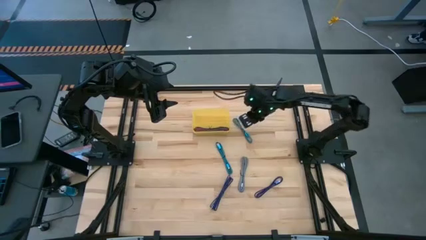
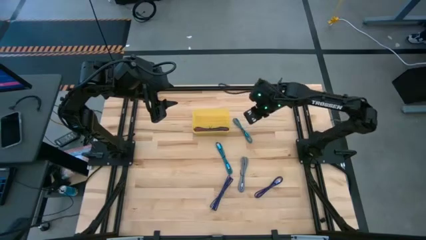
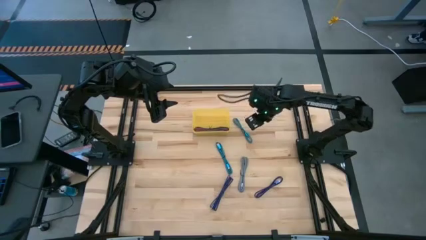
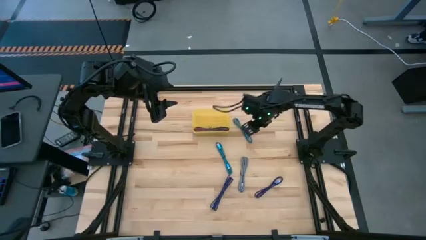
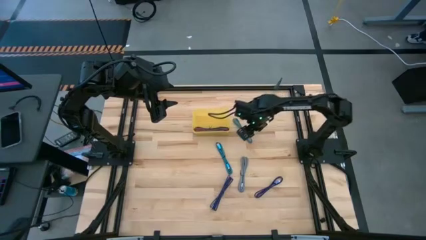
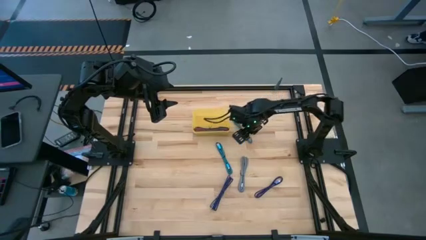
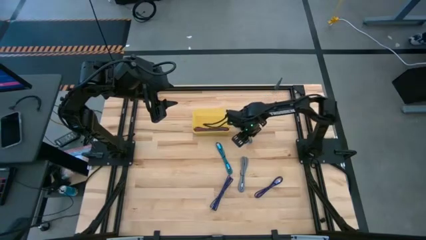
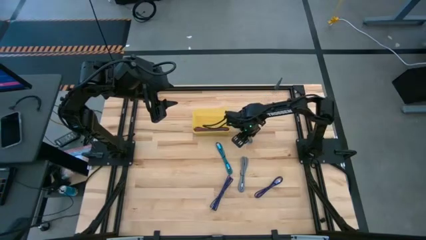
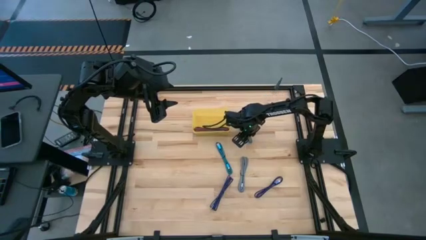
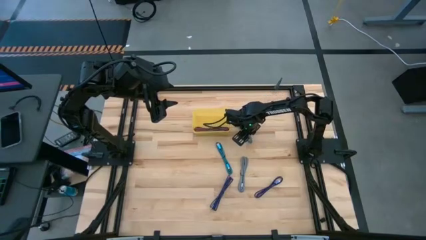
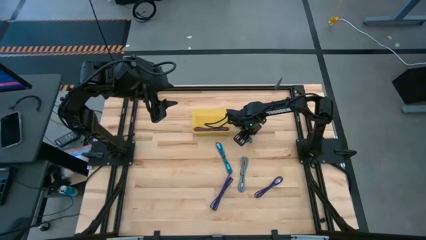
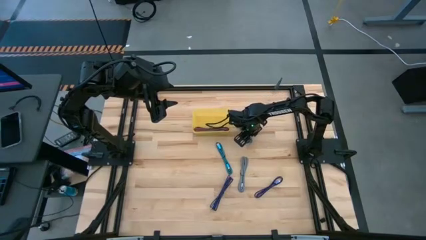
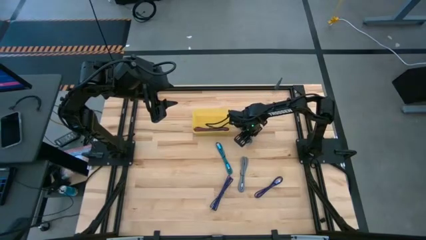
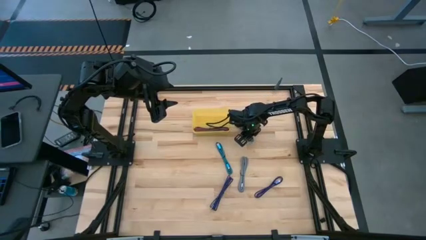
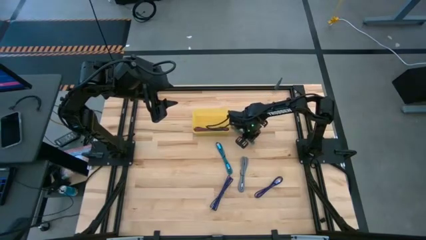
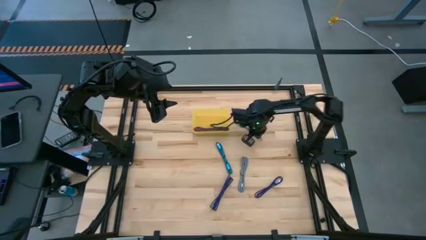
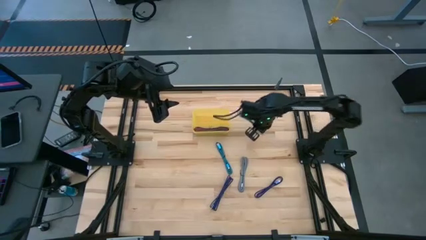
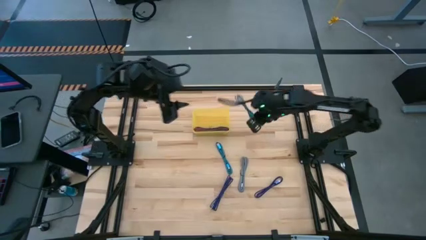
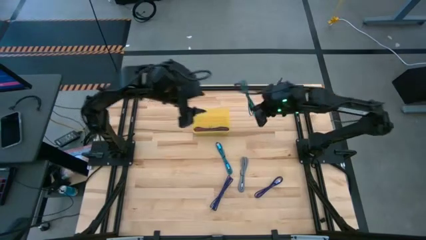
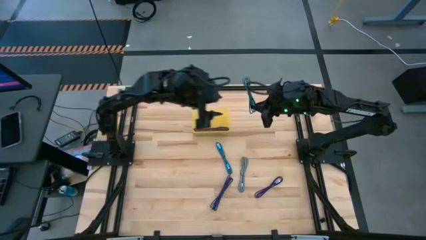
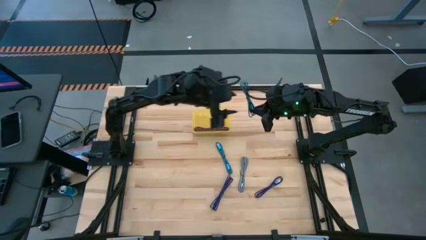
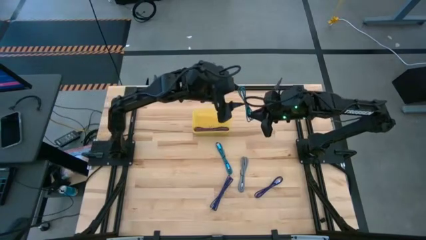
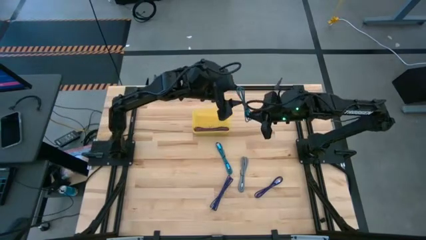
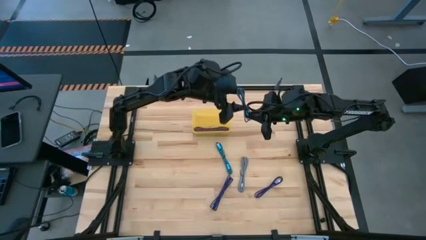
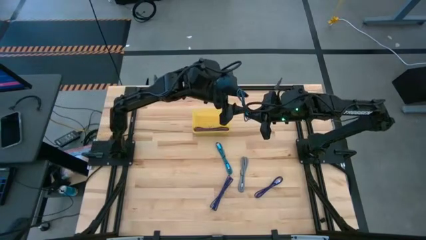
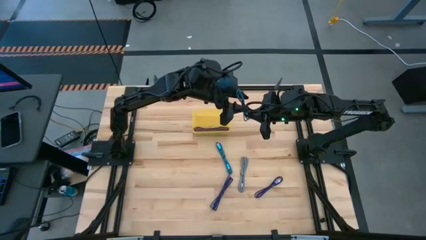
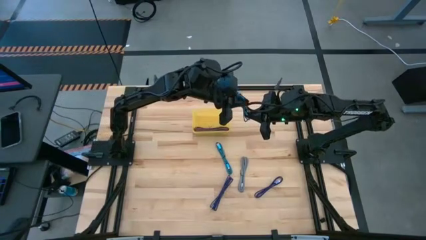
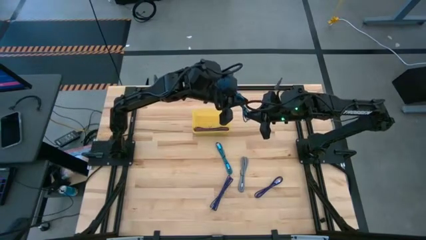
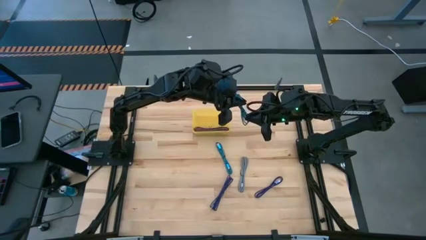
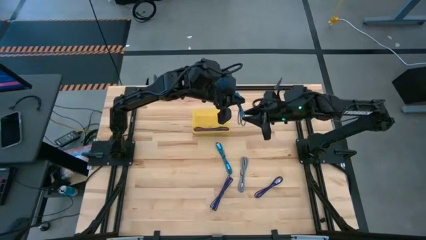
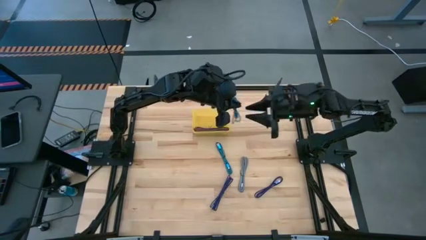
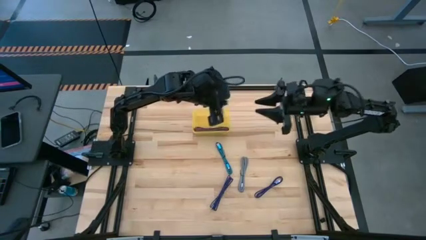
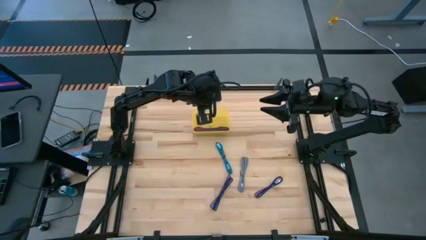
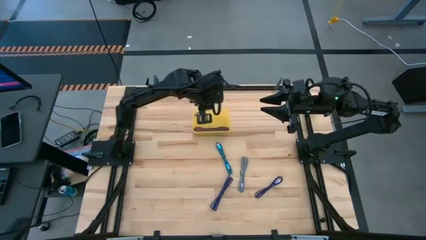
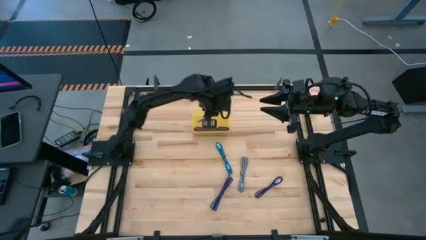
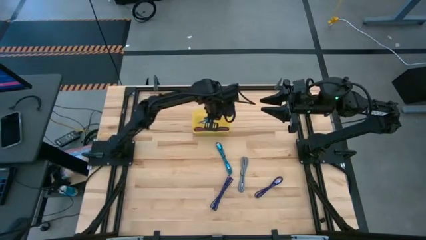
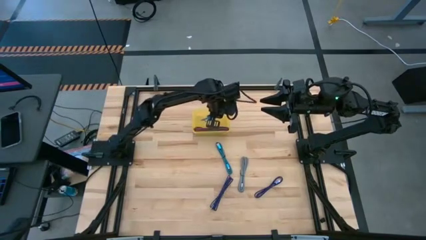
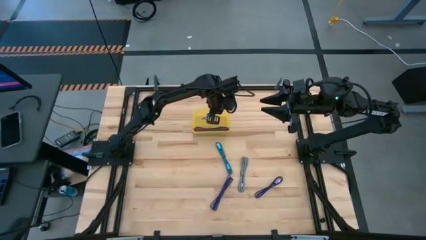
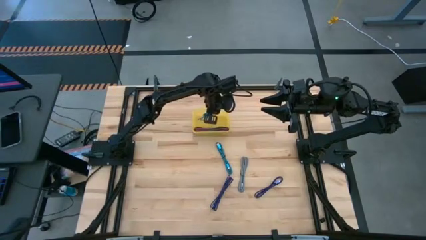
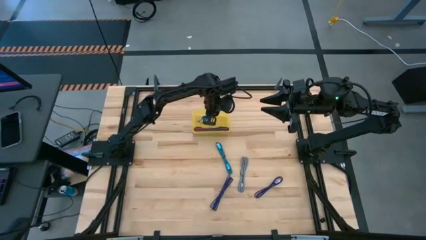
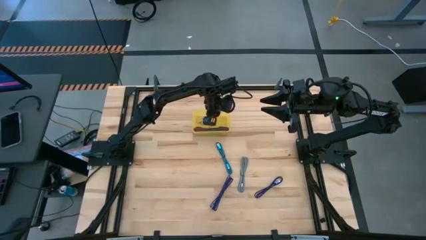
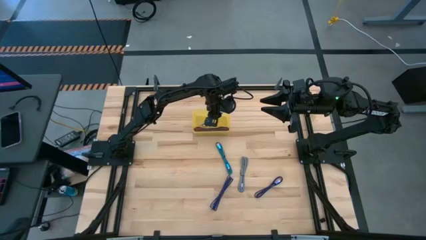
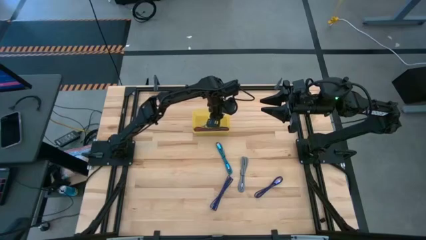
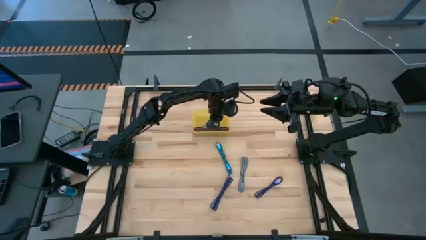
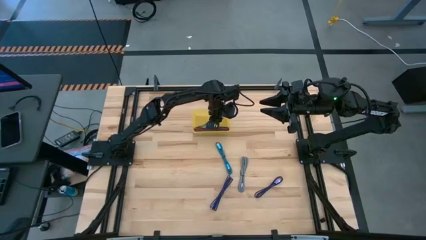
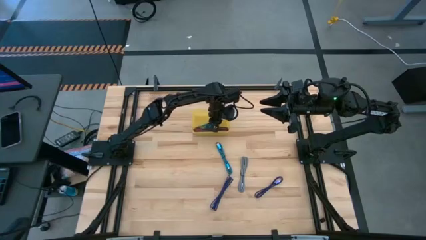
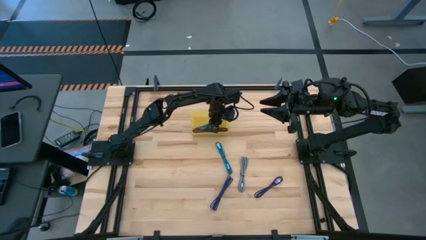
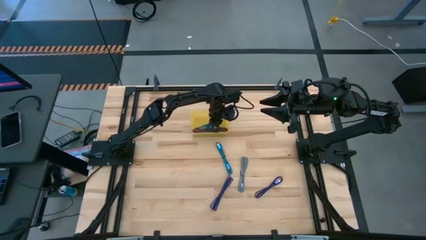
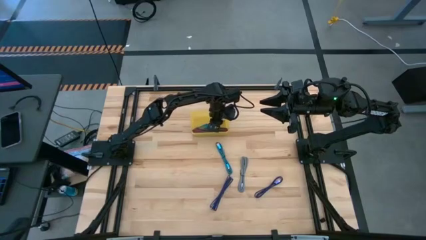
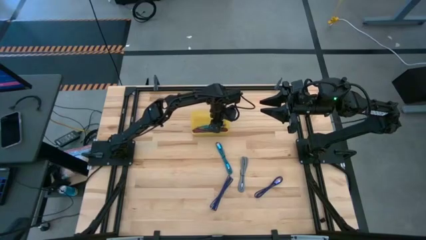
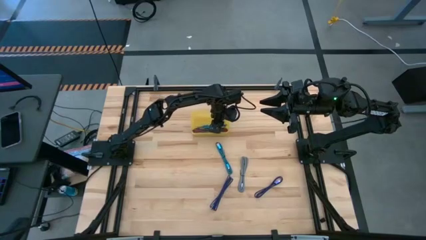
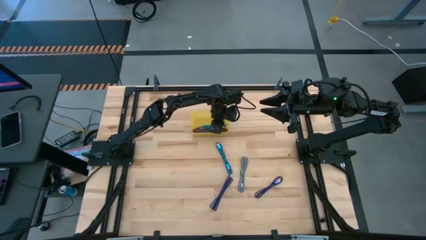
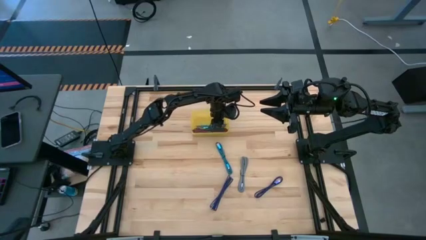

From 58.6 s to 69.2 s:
Task: Pick and place USB-C Cables
Put the top blue charger cable into the bin

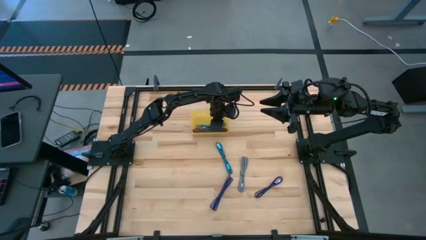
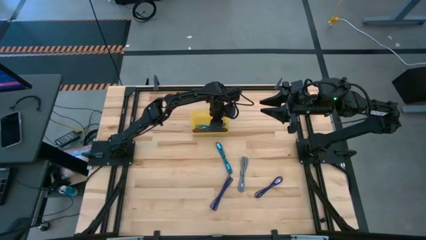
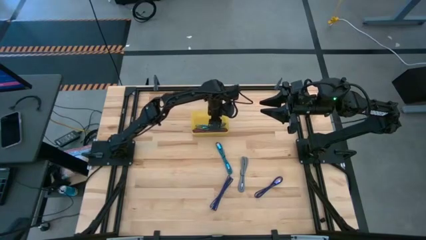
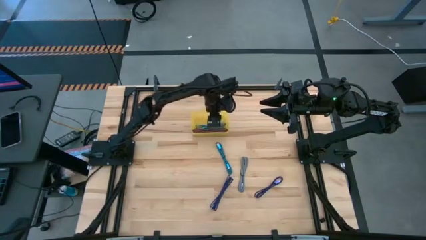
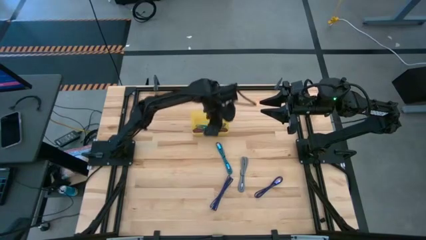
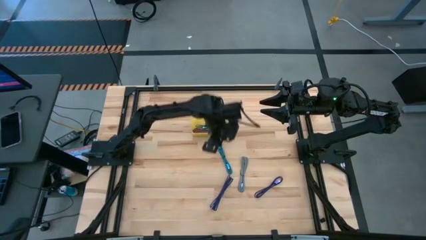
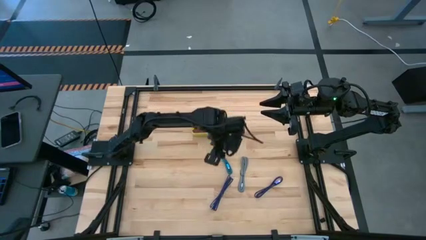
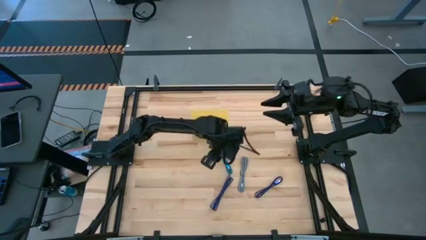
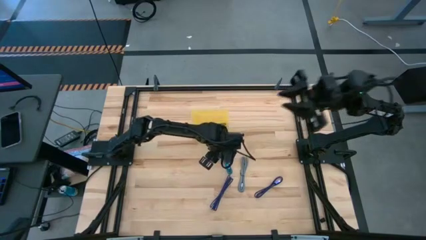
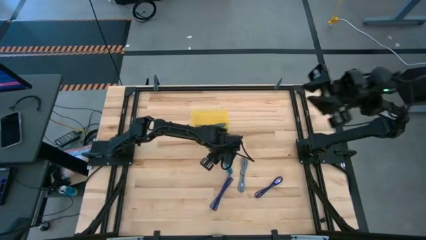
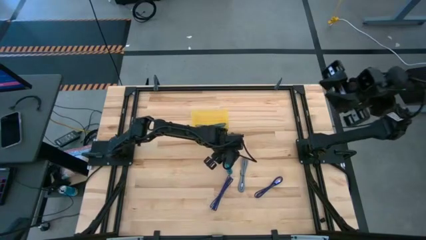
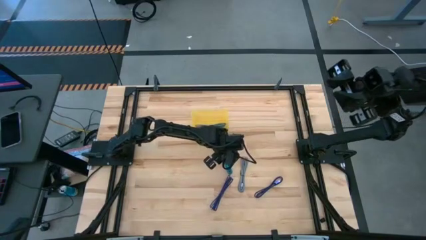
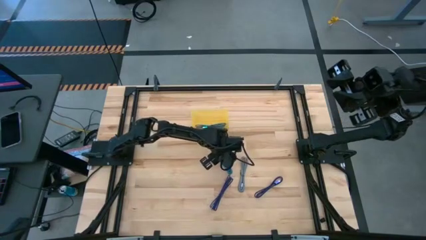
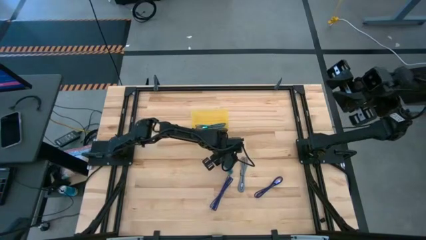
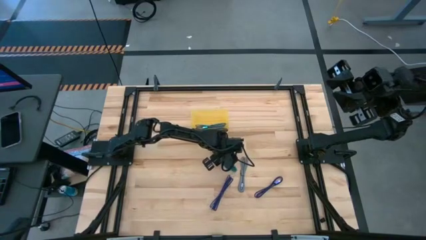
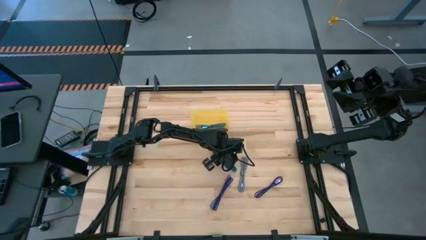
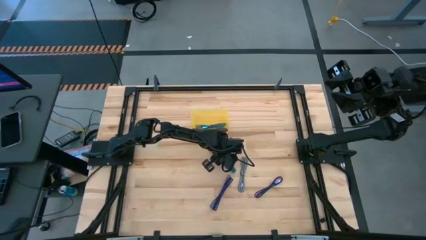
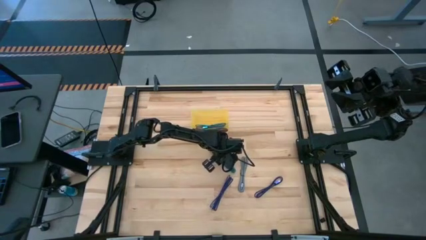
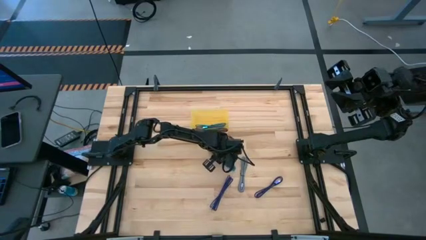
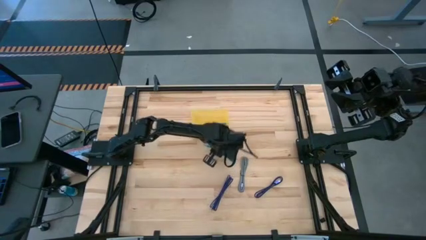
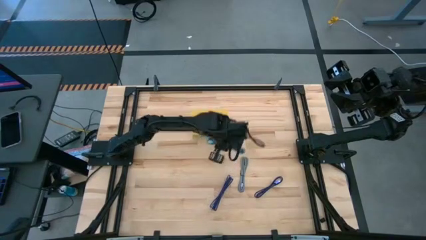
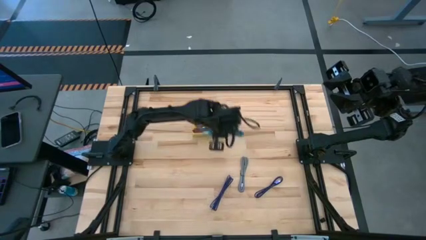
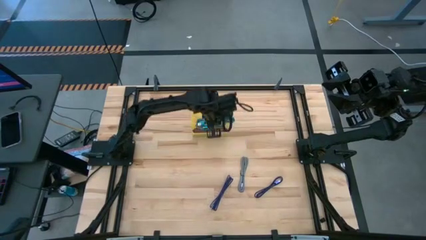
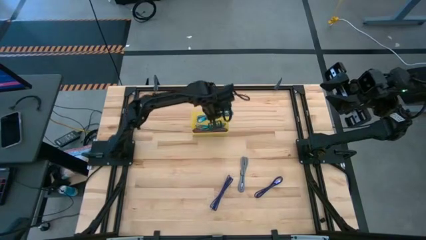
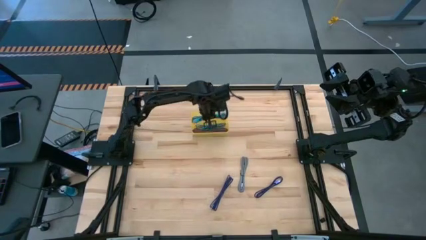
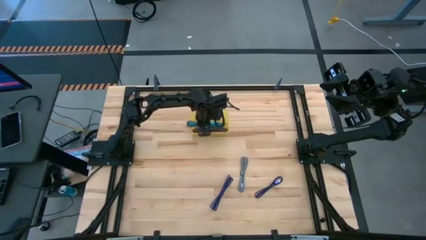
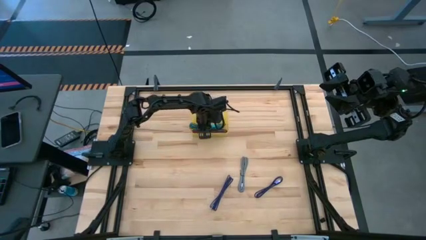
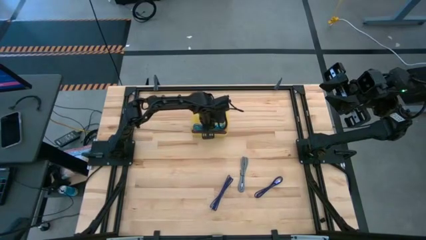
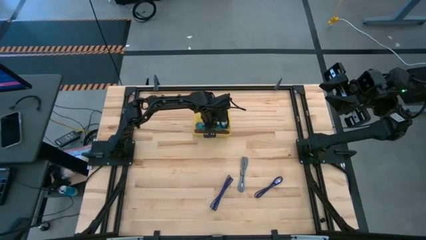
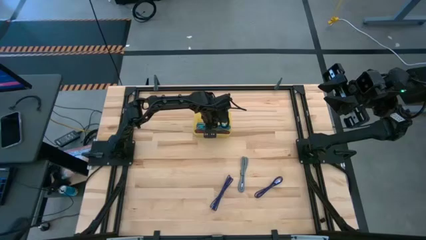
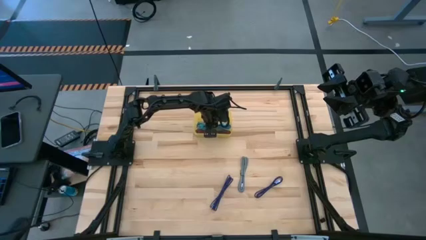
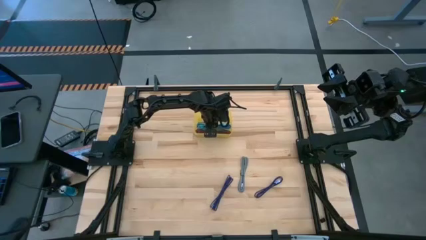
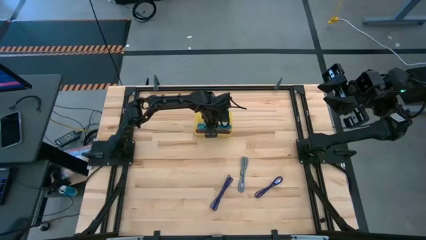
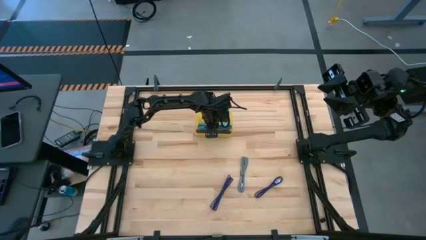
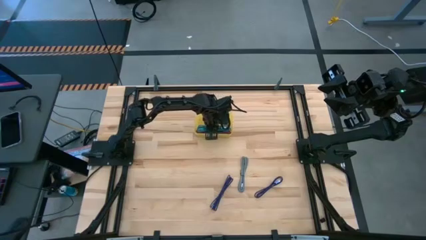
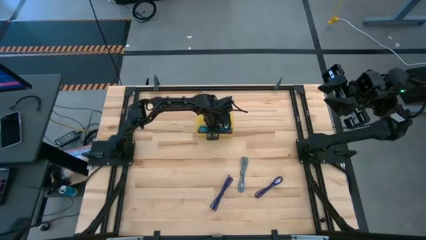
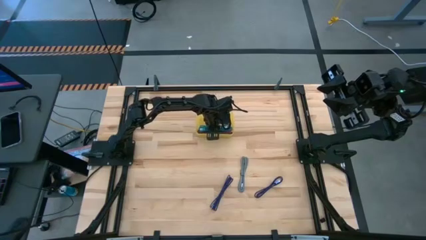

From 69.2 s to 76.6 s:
Put the blue charger cable into the bin
